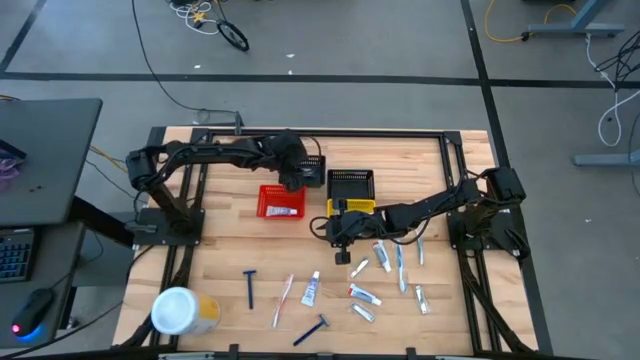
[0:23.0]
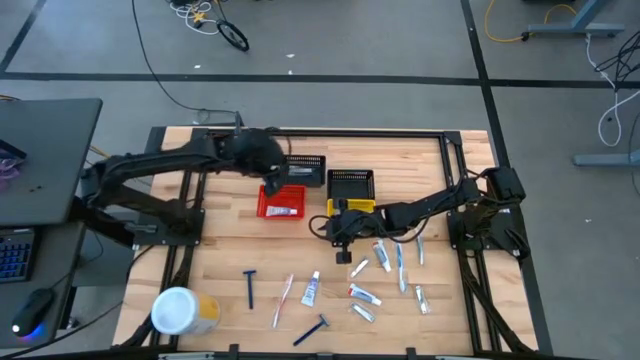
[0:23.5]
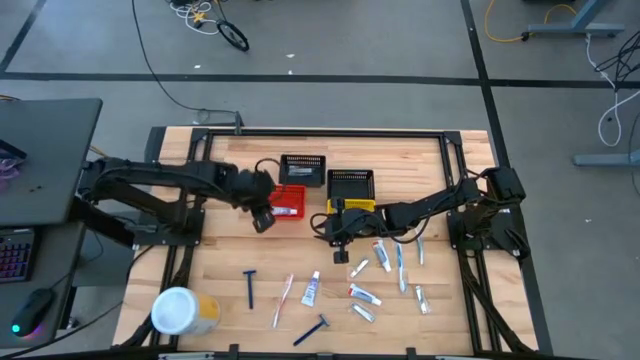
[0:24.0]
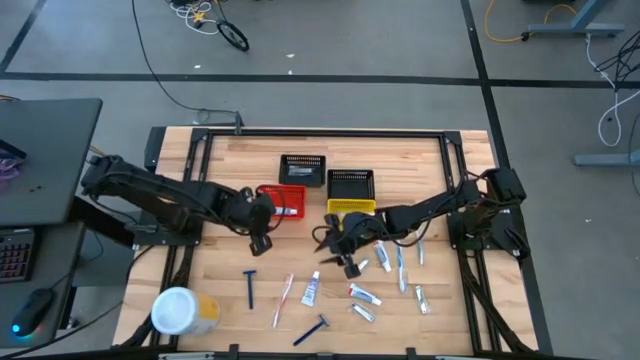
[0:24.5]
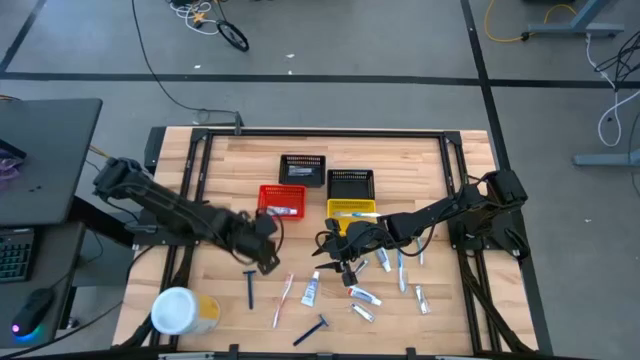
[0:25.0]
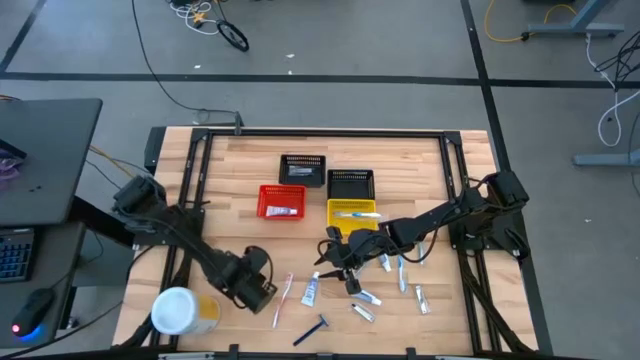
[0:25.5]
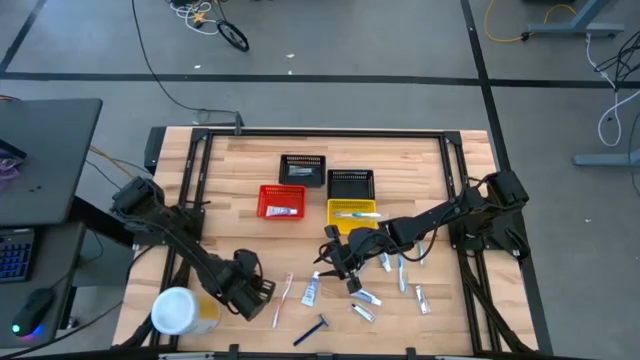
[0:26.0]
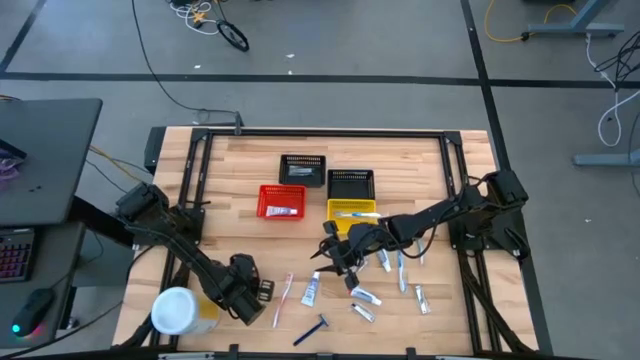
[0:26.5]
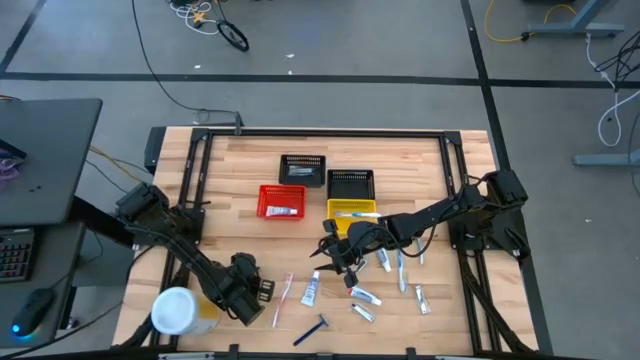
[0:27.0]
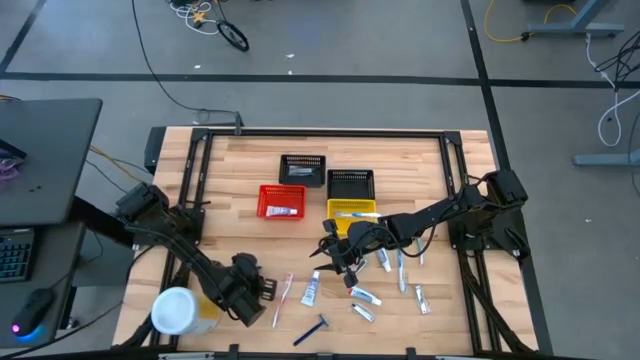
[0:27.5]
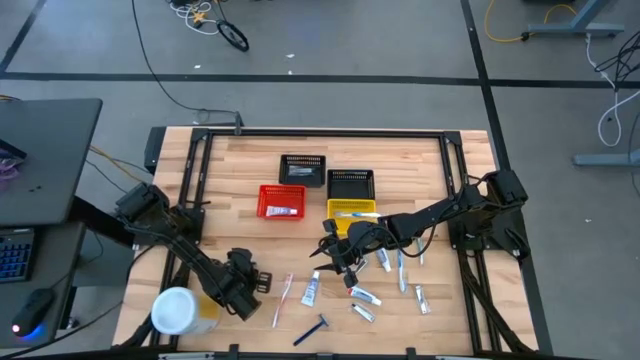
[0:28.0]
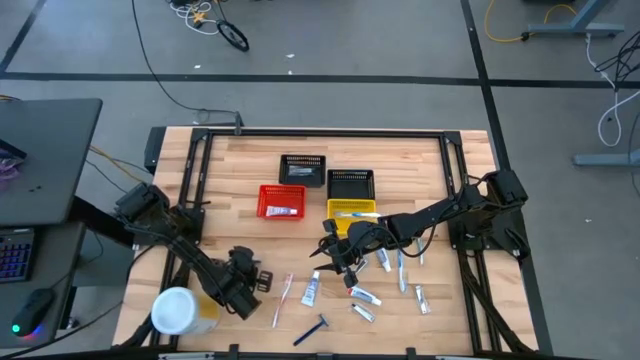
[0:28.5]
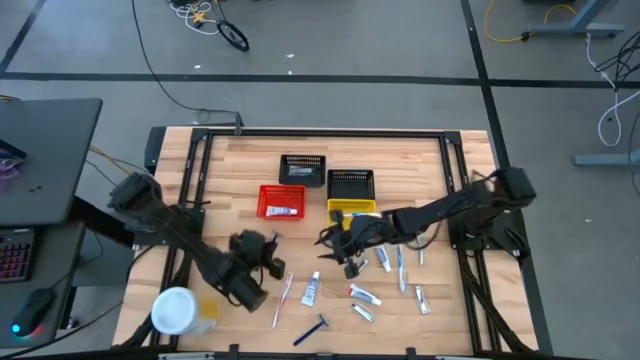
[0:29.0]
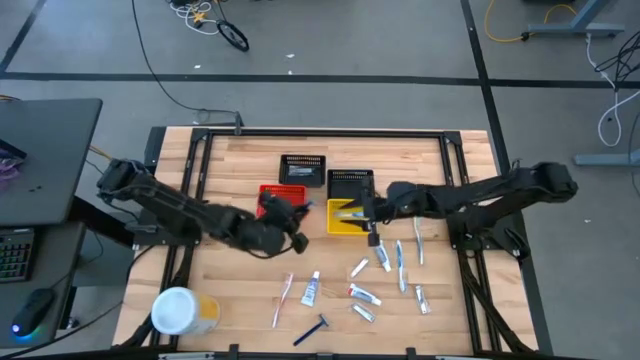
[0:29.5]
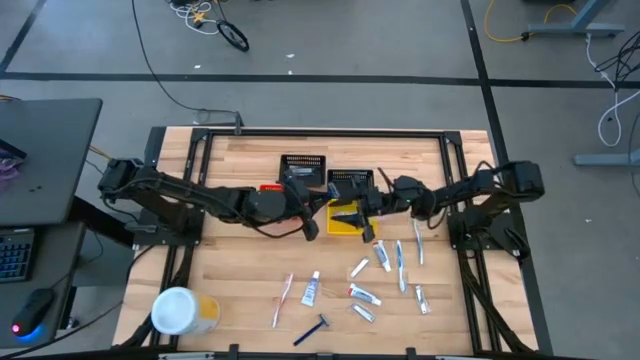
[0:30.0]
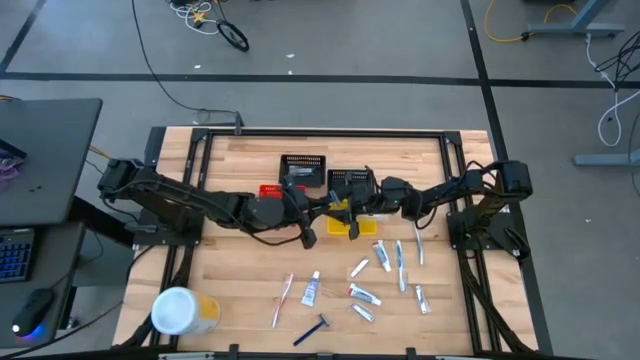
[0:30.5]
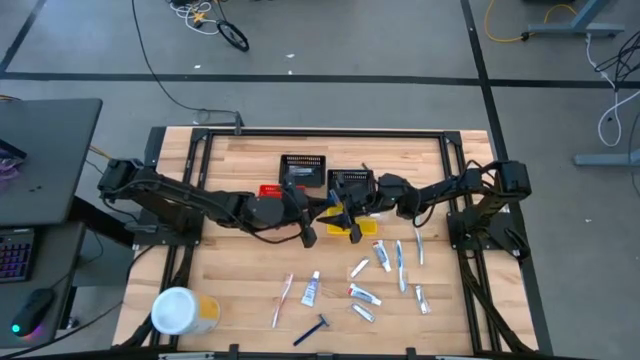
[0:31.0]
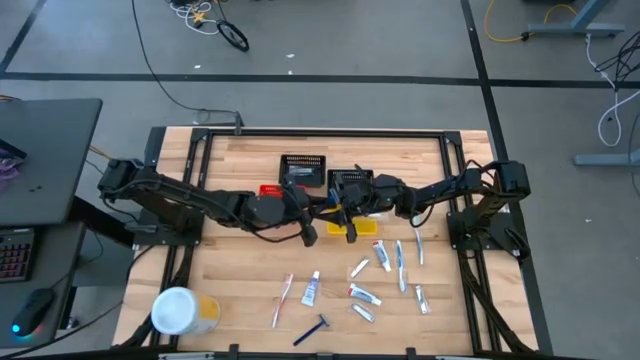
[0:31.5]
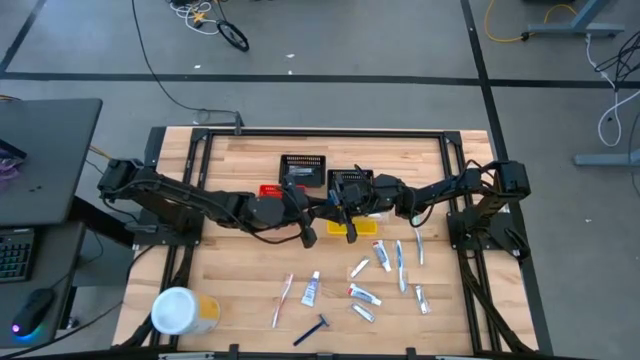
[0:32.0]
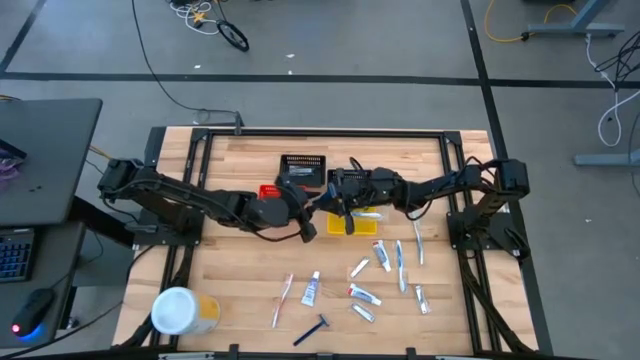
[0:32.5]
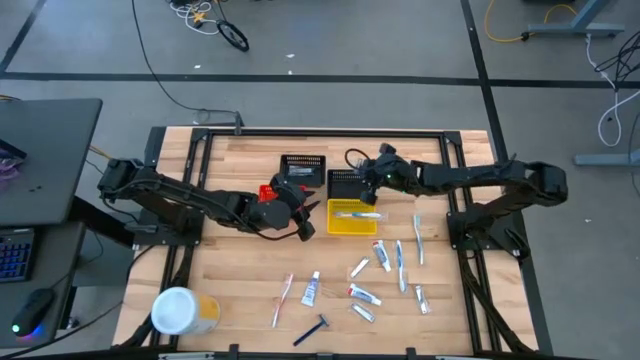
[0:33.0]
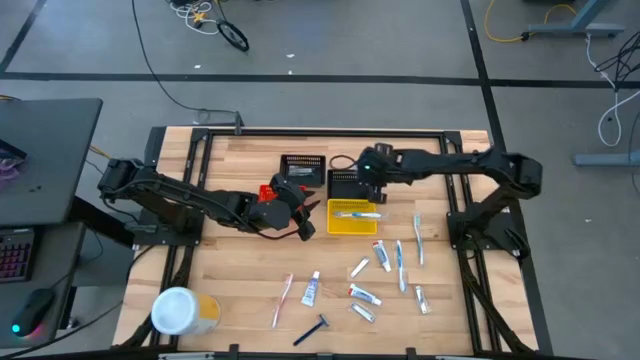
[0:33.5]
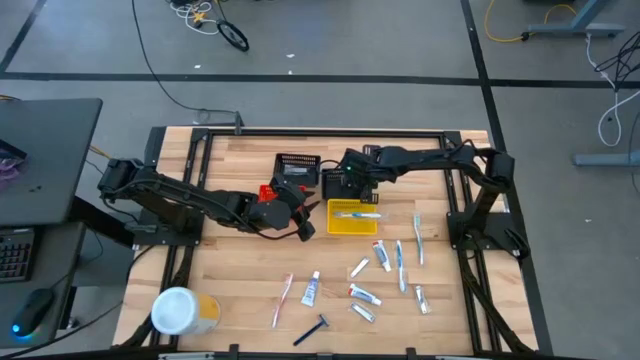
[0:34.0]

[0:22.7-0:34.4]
Task: Pick & Place Travel size toiletries
Put the blue razor into the right black bin

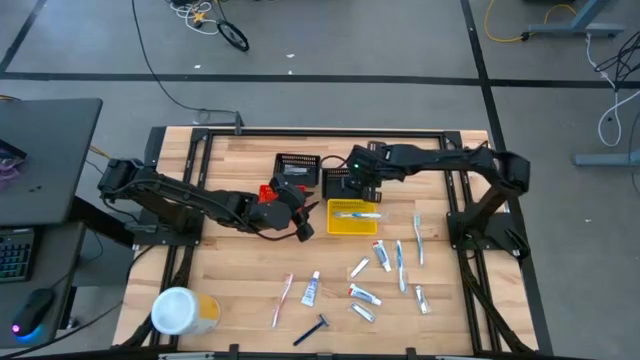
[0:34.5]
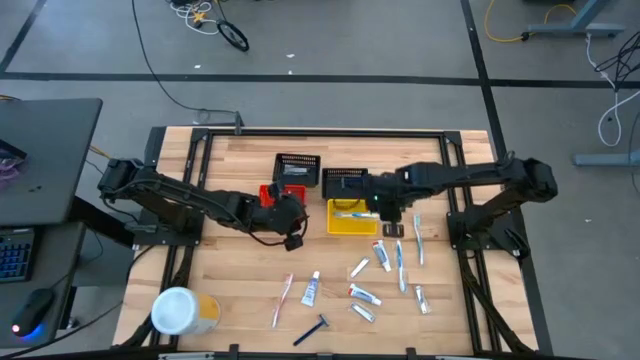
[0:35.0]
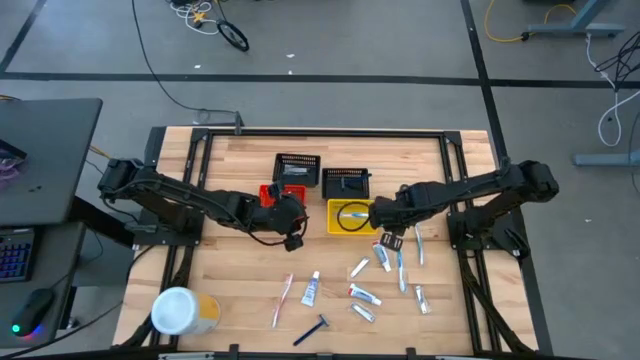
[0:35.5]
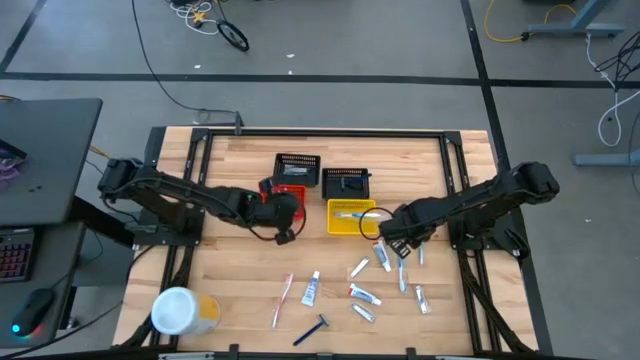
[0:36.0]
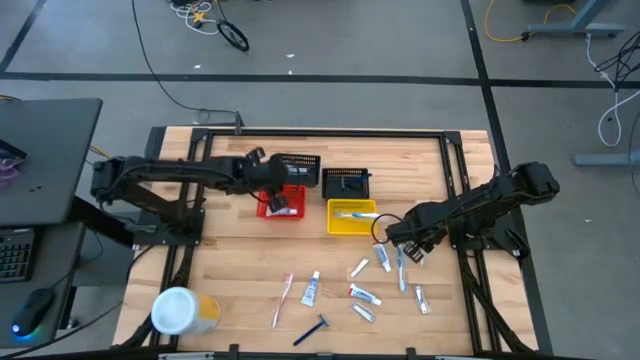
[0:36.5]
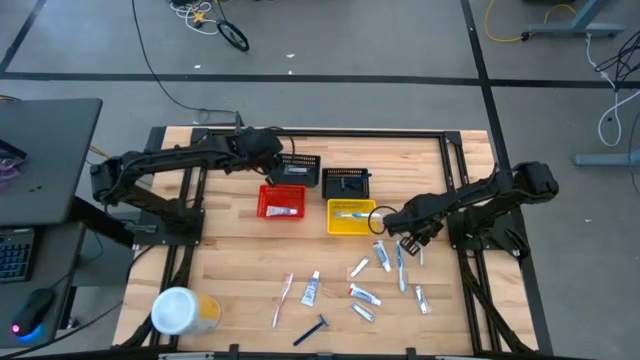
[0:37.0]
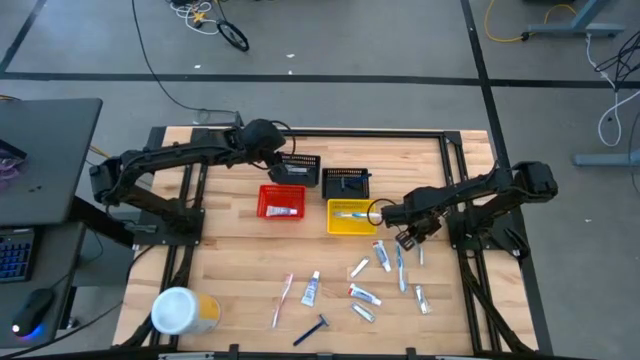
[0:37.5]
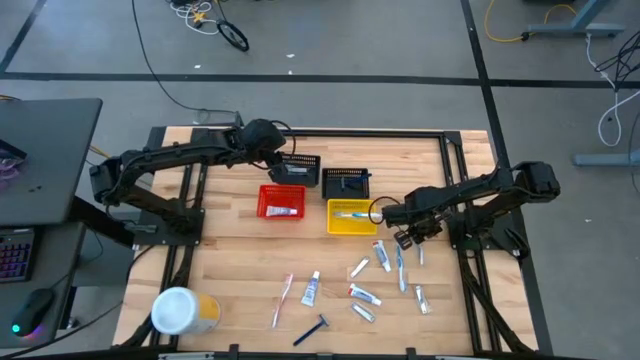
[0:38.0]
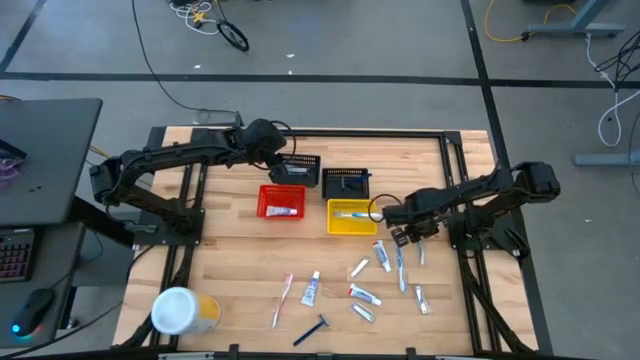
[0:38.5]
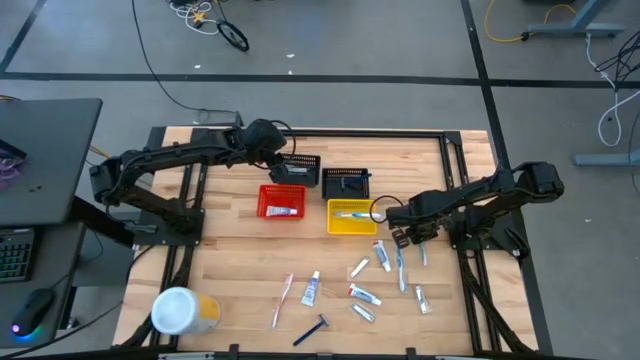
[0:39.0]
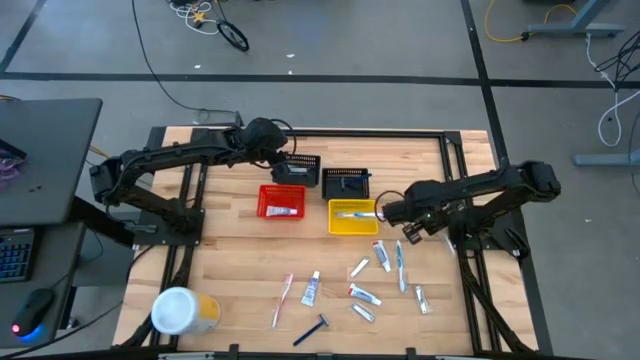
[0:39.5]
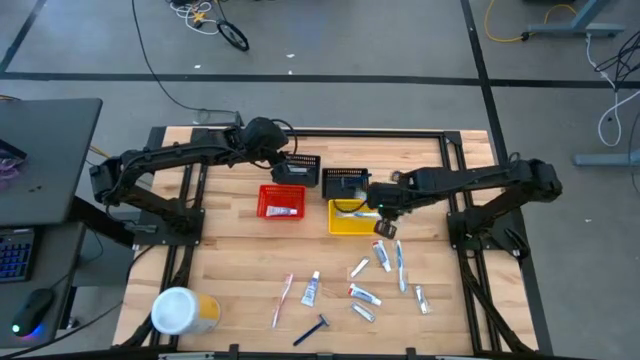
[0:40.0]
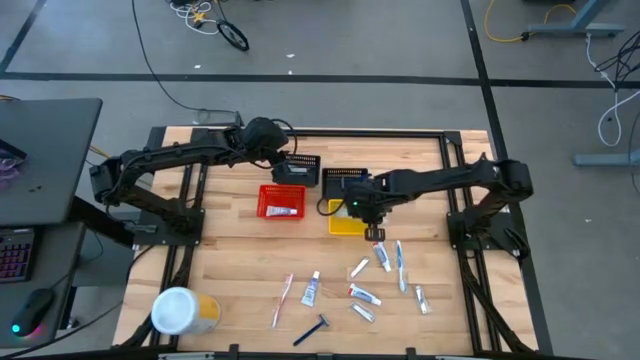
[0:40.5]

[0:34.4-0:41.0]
Put the green toothbrush into the yellow bin

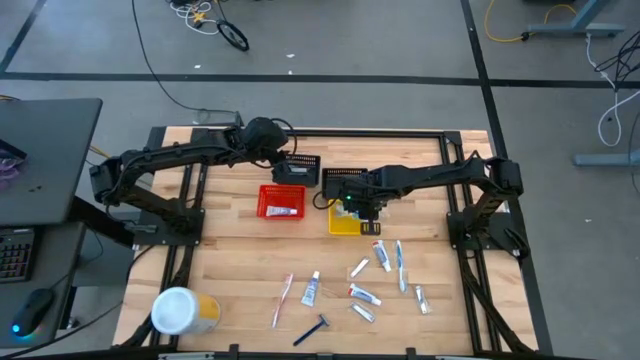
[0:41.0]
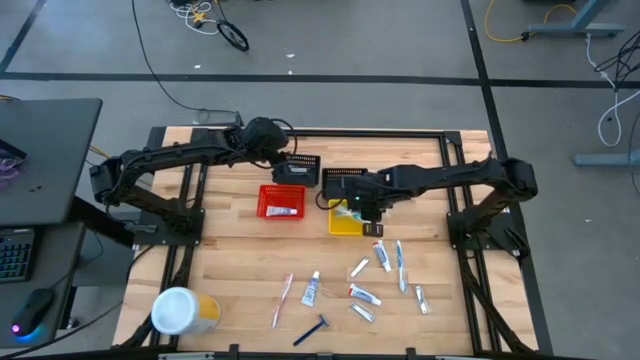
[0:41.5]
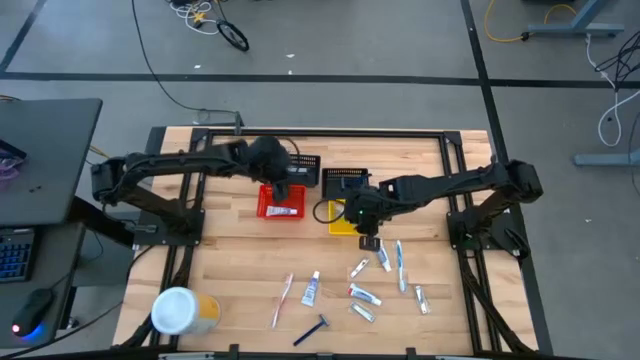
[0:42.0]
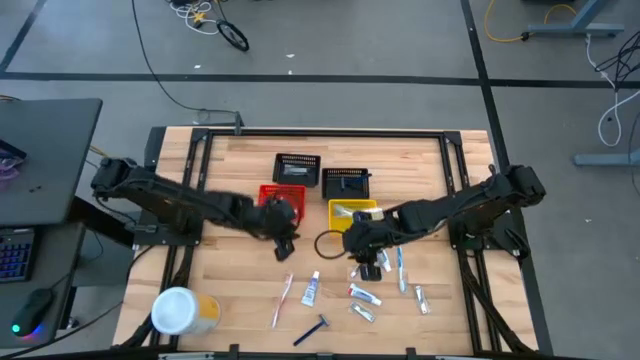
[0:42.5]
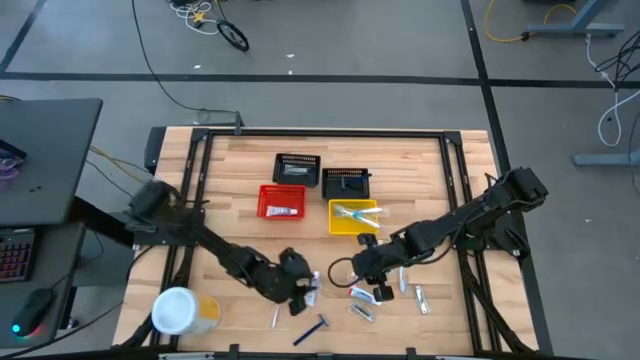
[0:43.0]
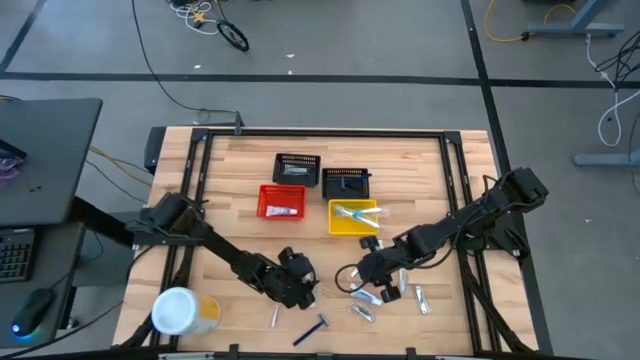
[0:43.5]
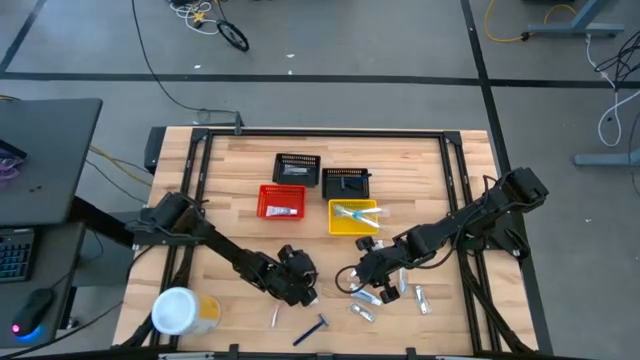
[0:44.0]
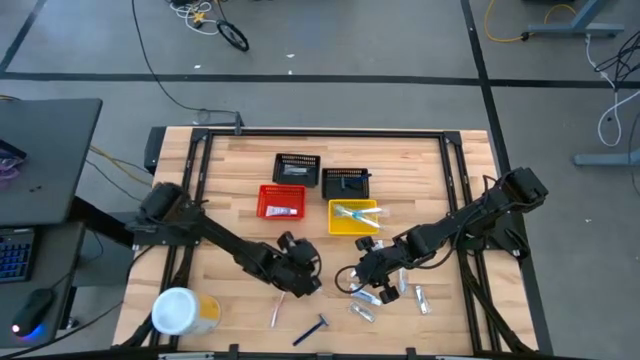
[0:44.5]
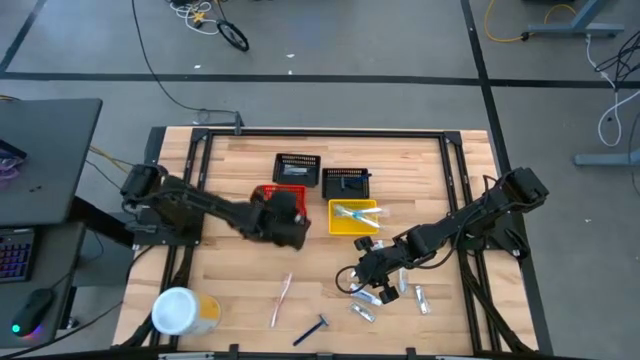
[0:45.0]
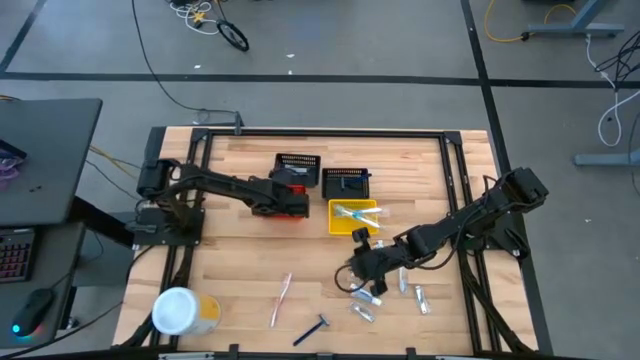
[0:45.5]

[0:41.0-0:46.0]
Put the white toothpaste into the red bin
